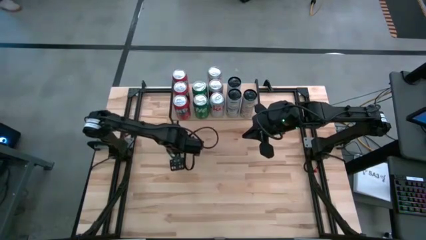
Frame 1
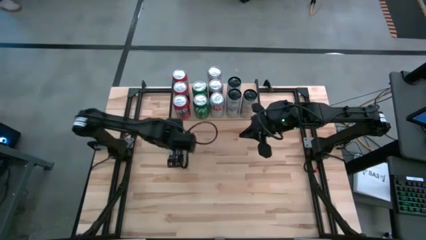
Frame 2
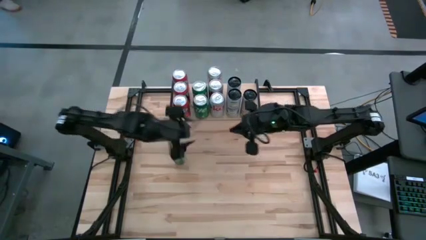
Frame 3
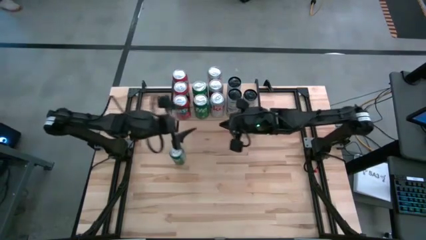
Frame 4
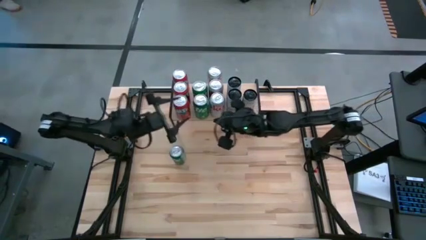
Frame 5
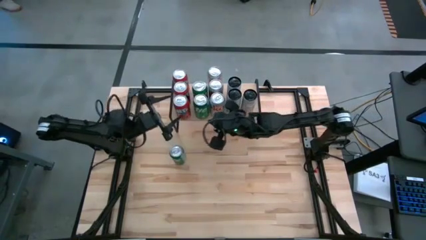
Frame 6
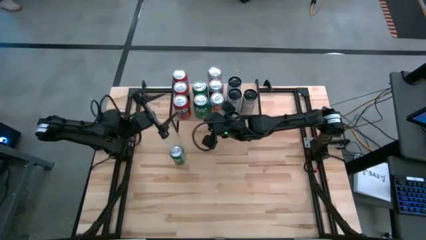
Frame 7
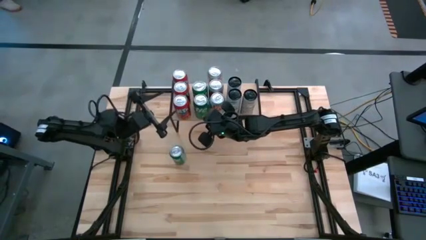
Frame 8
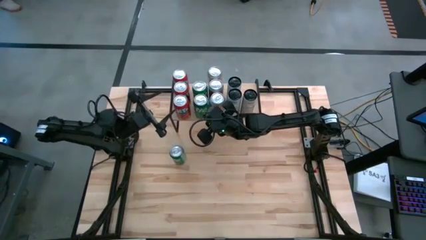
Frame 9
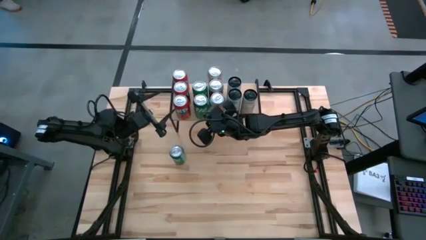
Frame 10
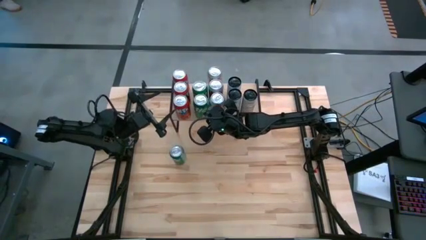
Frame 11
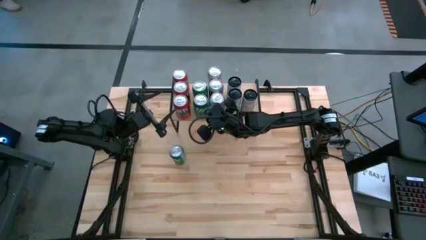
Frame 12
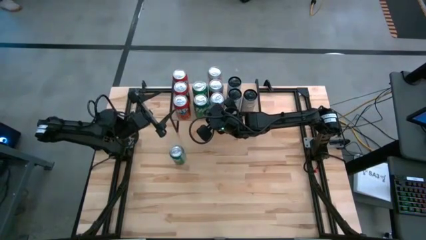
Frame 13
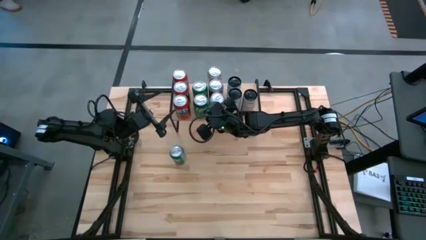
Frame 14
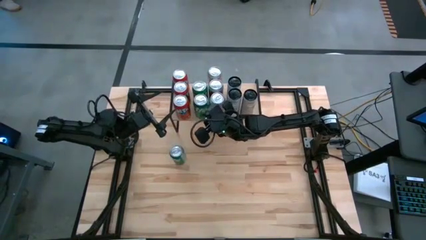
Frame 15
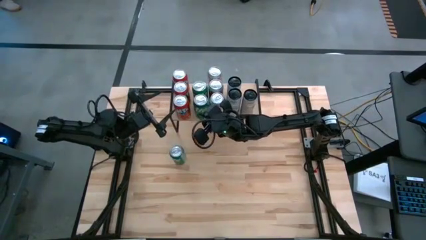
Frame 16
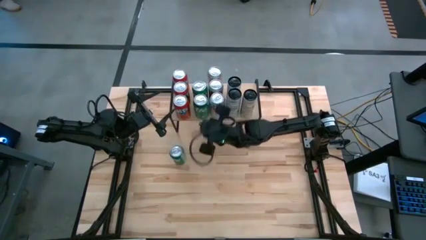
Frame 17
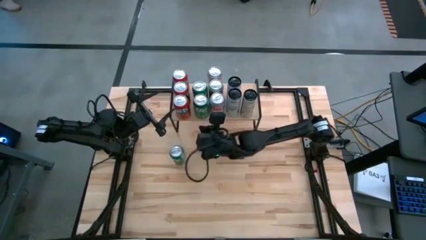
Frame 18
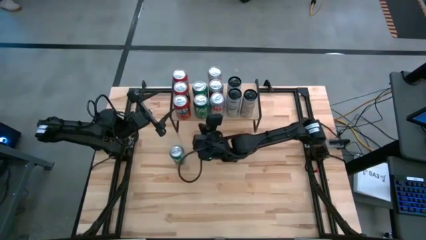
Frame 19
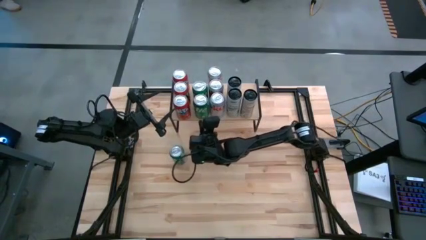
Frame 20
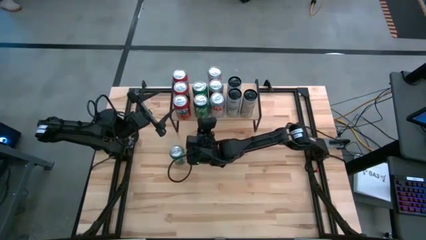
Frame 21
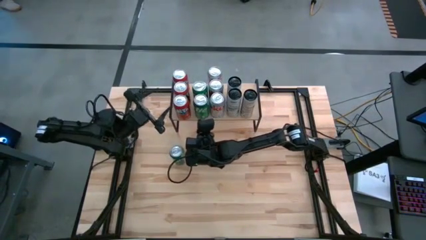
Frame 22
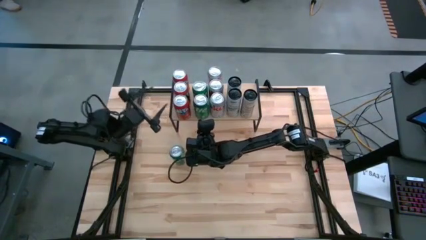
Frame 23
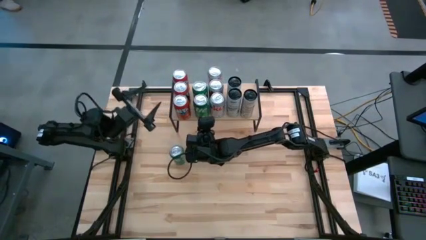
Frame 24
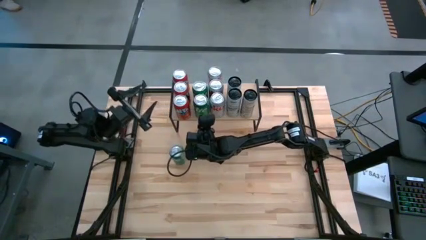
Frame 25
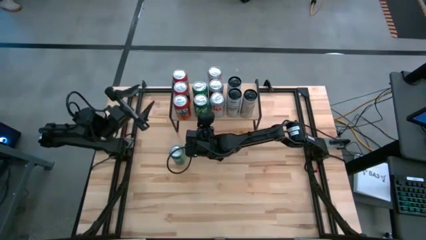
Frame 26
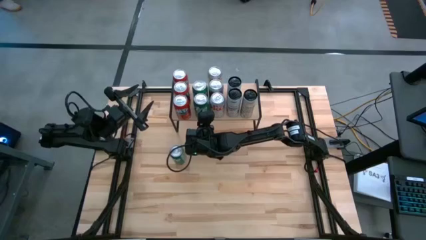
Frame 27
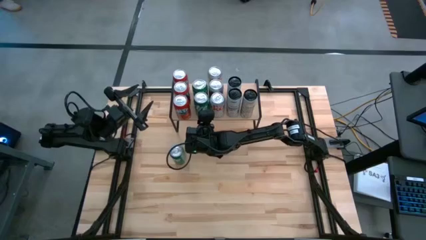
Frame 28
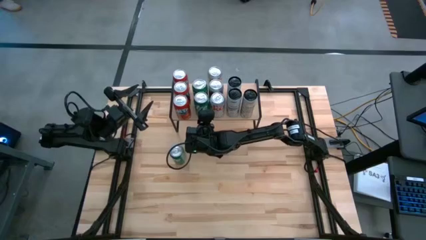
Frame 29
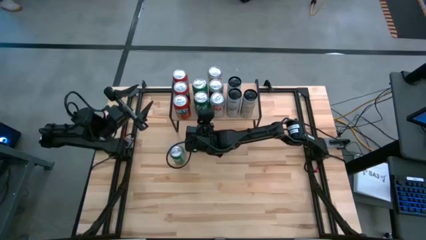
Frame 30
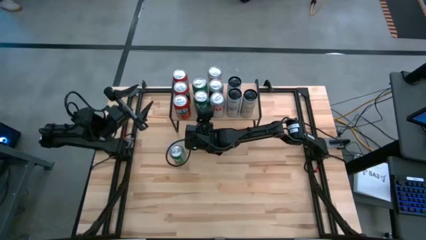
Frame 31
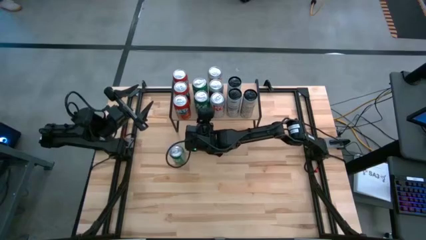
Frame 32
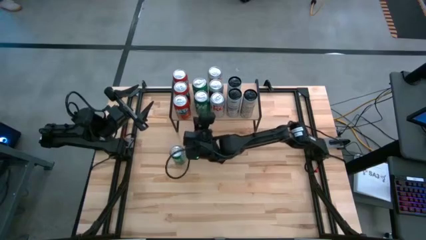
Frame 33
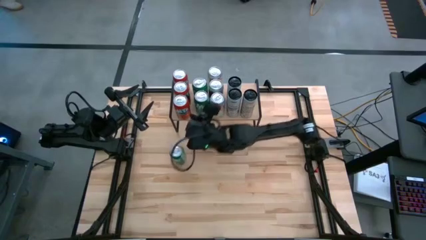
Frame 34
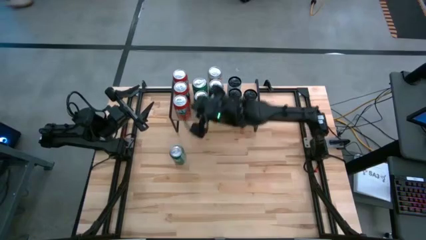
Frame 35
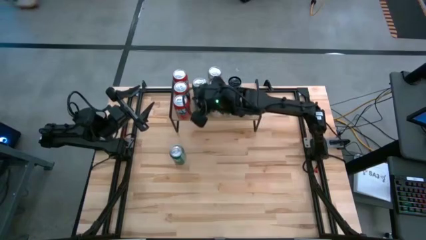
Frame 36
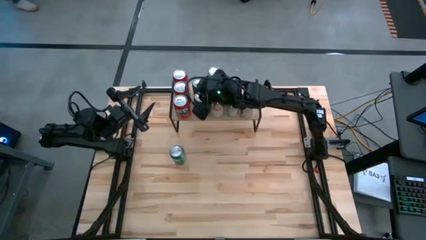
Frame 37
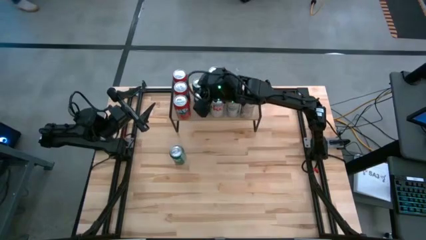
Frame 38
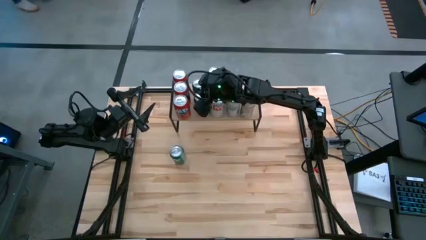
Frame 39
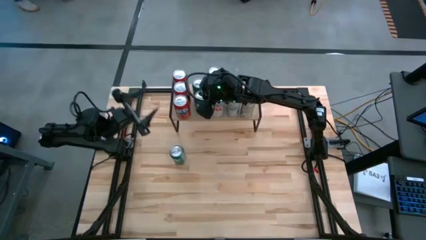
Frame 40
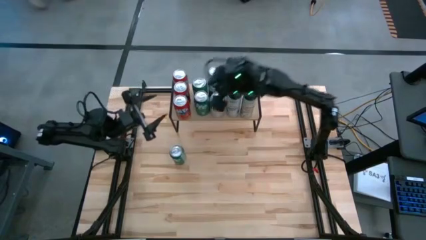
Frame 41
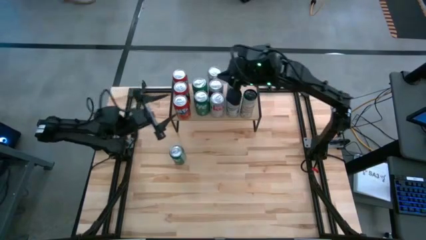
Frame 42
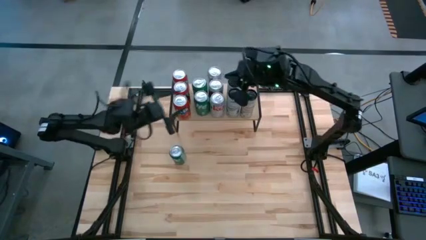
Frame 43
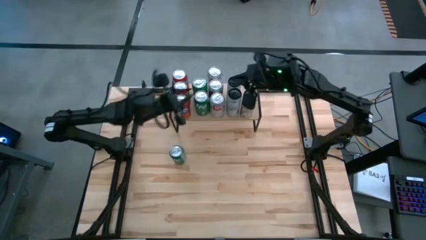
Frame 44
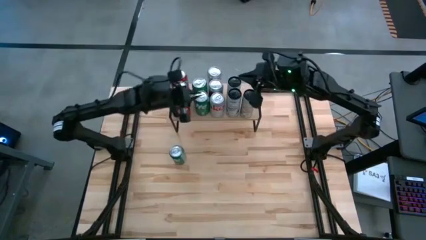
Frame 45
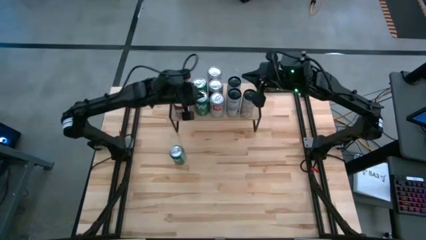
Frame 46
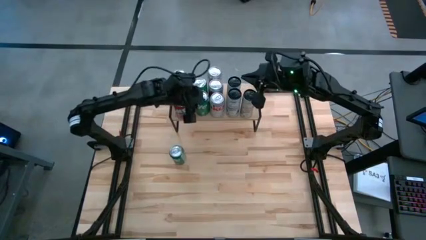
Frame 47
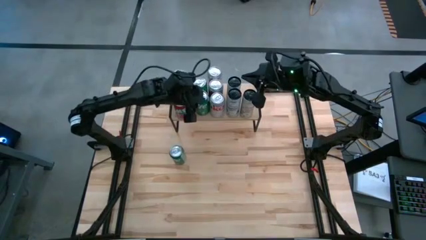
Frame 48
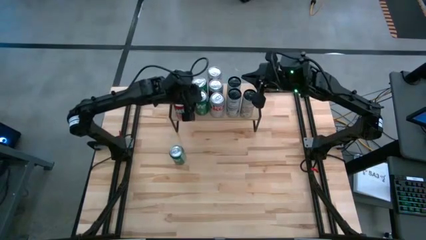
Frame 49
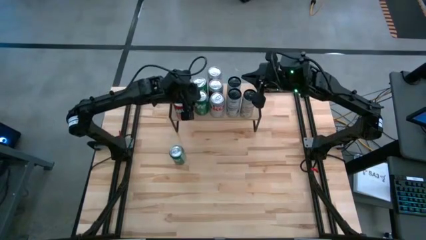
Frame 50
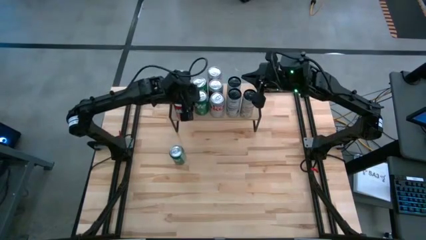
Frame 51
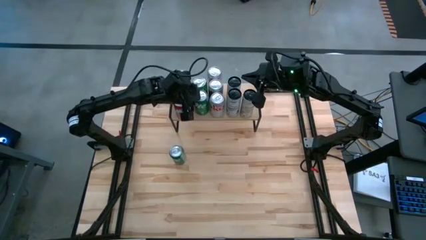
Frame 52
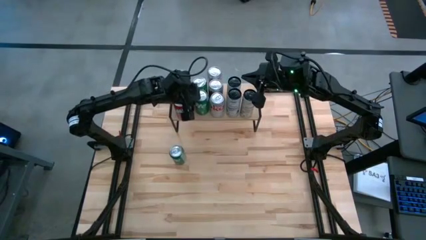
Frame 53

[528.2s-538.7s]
Task: Place canned beverage on shelf
Adjust the green soda cans on the shelf

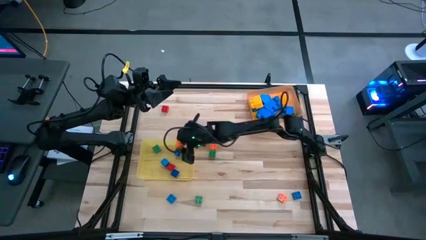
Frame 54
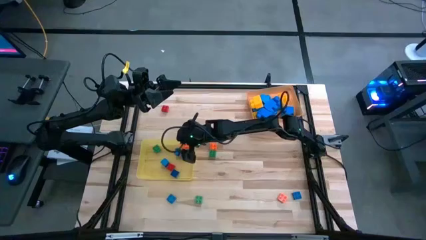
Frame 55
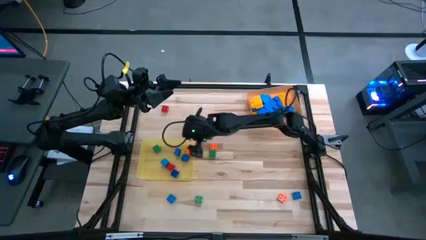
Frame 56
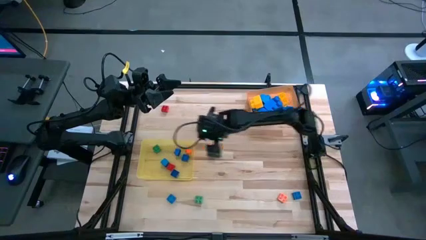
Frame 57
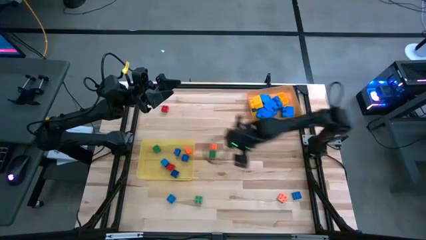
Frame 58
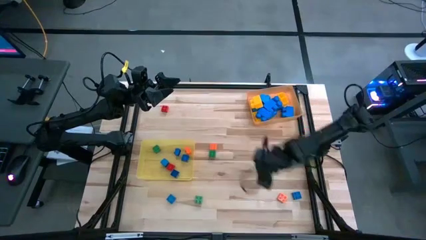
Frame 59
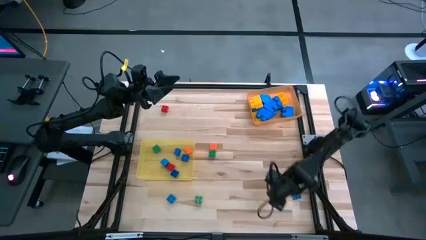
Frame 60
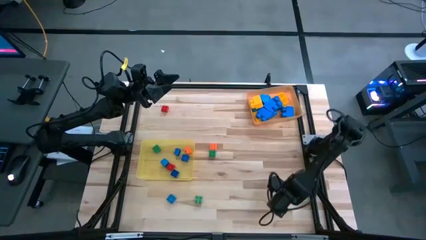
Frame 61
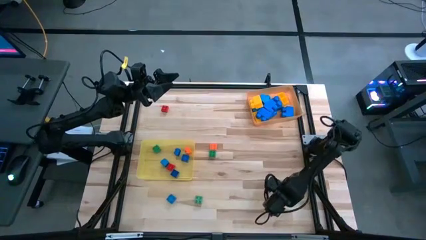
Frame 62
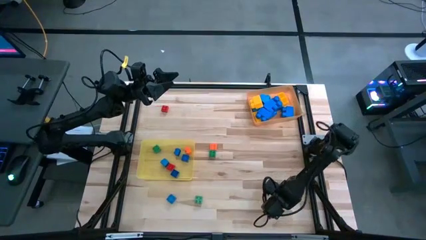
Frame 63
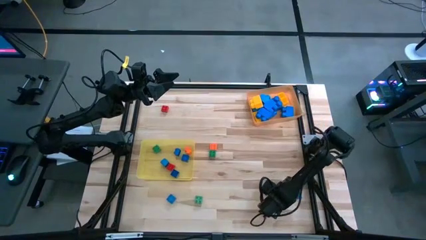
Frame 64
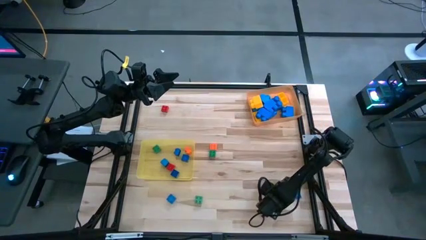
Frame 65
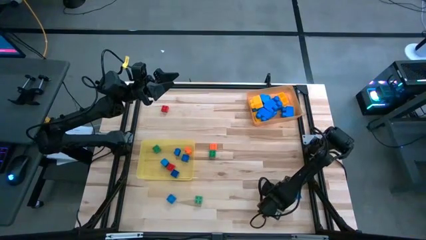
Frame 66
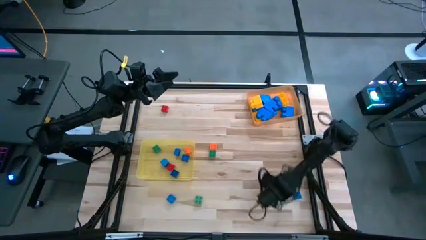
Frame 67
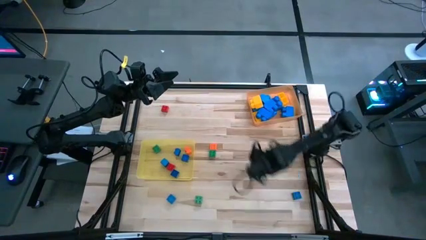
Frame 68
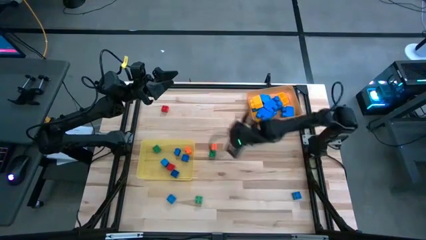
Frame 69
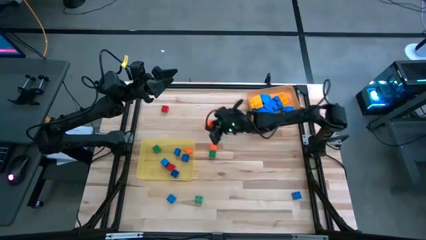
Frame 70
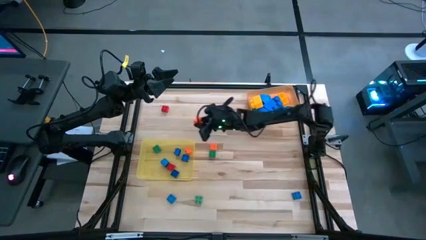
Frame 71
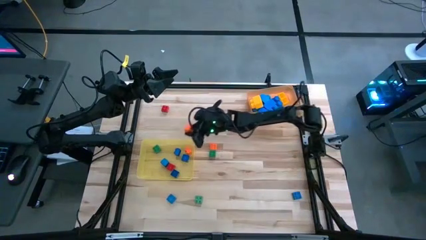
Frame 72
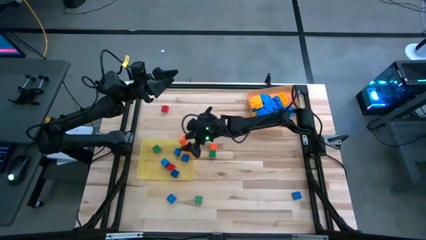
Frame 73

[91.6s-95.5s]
Task: Sort blocks by size
Put the small orange 4 stud game piece into the yellow bin

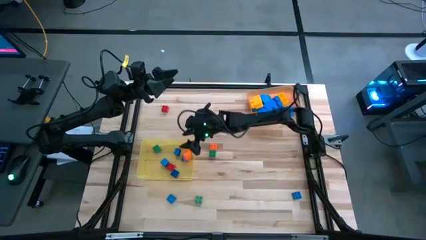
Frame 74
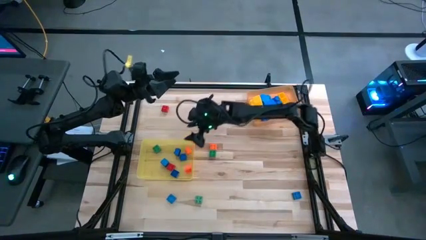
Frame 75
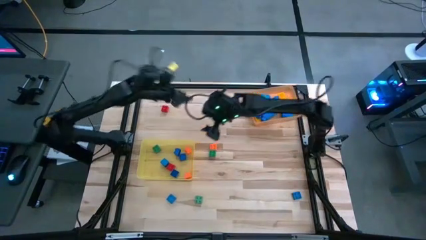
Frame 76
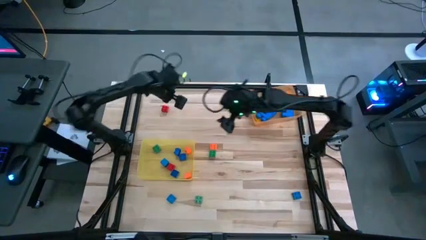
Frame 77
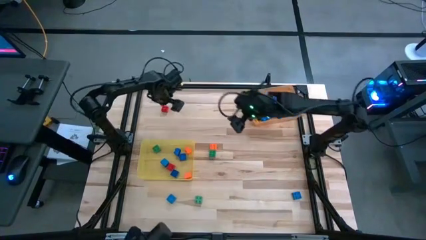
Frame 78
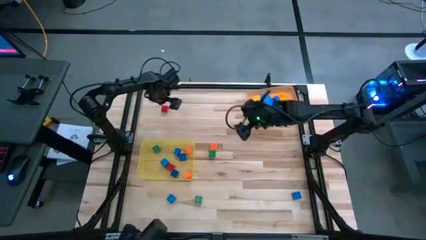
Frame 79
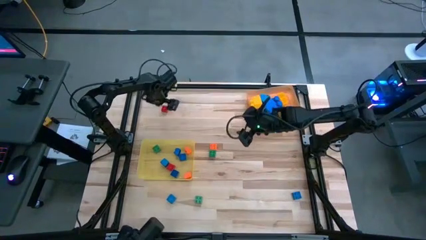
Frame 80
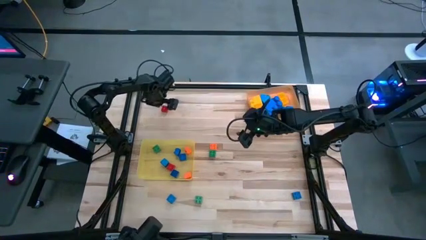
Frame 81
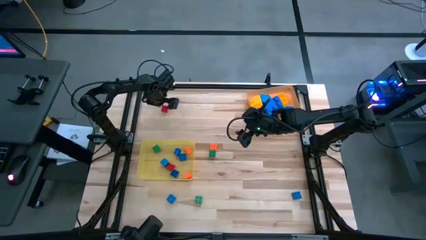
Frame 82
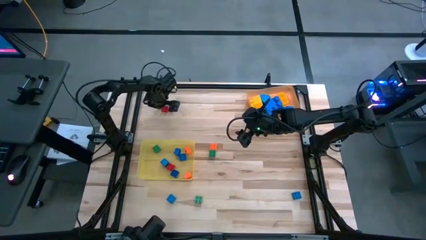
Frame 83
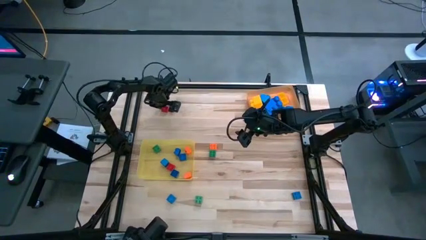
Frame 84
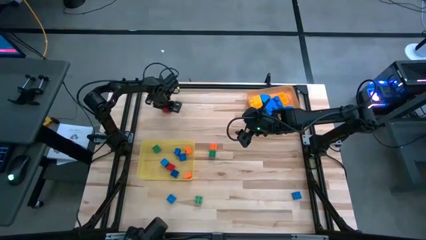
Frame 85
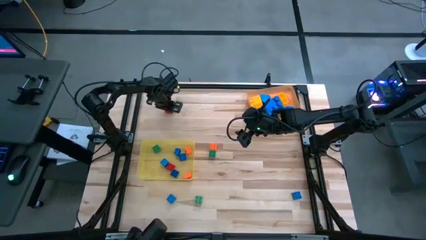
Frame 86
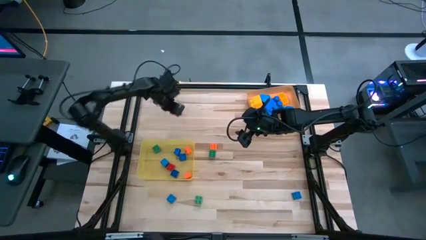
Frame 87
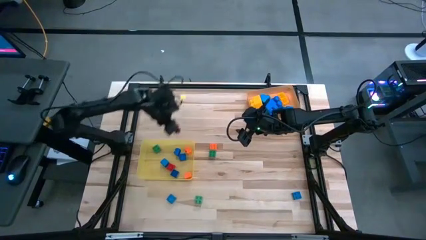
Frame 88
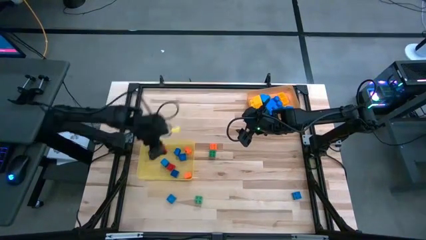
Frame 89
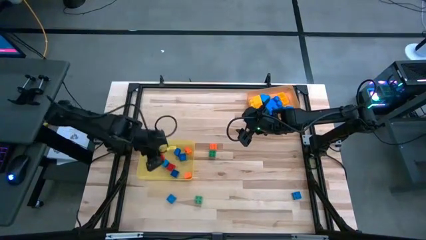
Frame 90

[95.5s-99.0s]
Put the small 4 stud red game piece into the yellow bin
